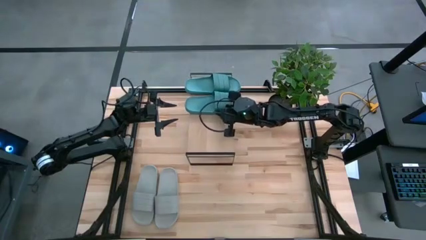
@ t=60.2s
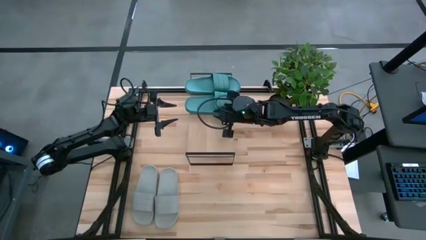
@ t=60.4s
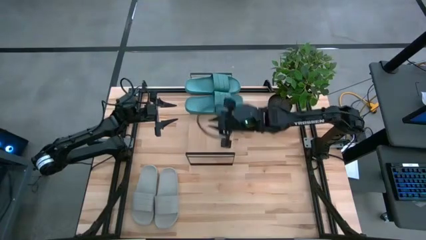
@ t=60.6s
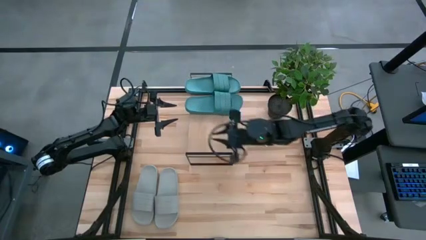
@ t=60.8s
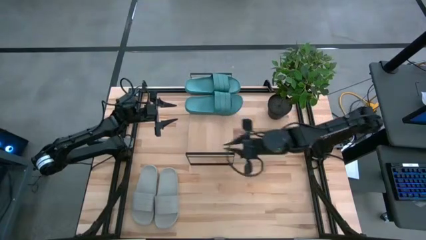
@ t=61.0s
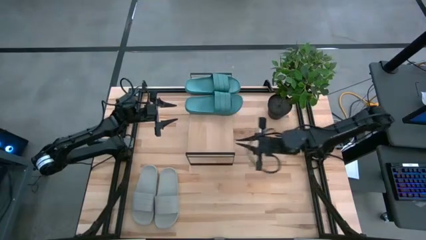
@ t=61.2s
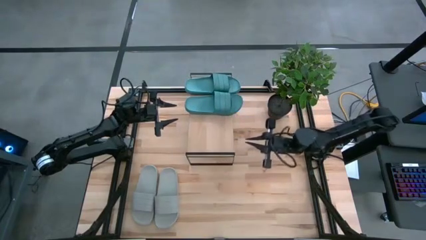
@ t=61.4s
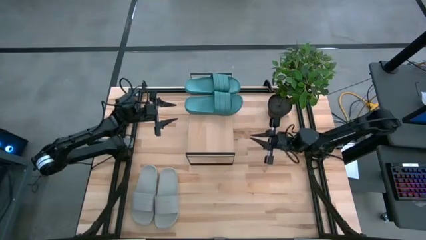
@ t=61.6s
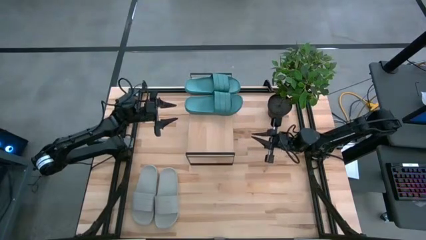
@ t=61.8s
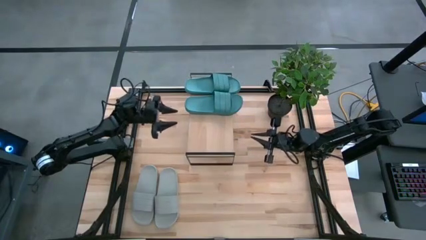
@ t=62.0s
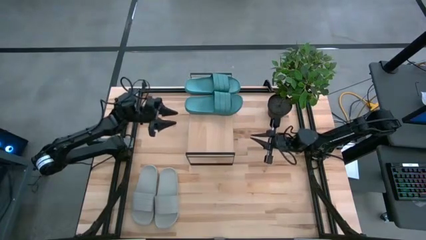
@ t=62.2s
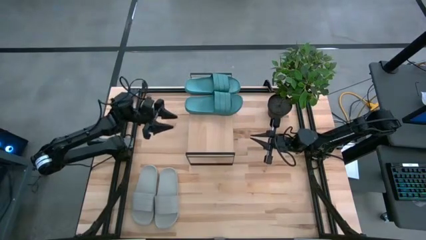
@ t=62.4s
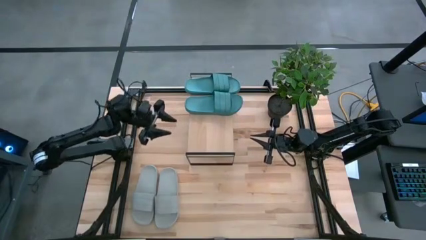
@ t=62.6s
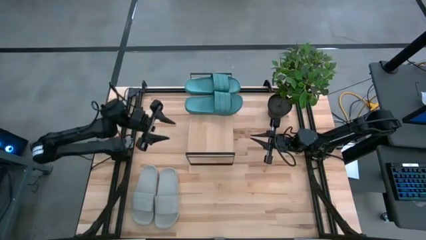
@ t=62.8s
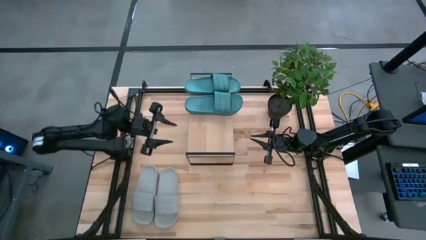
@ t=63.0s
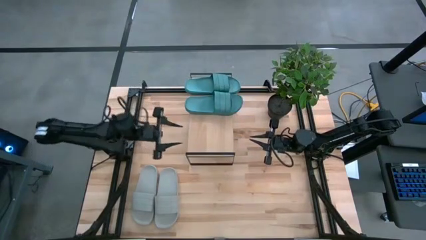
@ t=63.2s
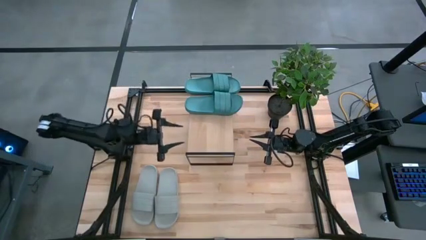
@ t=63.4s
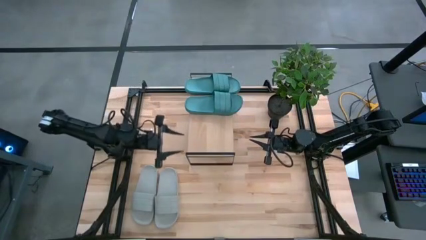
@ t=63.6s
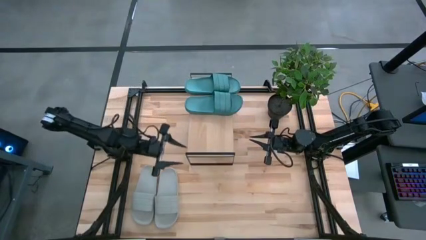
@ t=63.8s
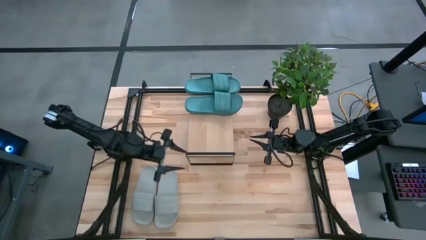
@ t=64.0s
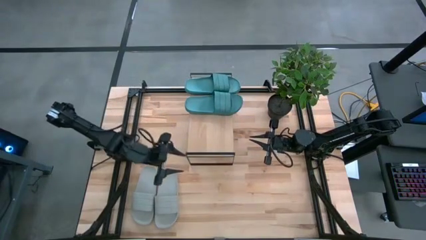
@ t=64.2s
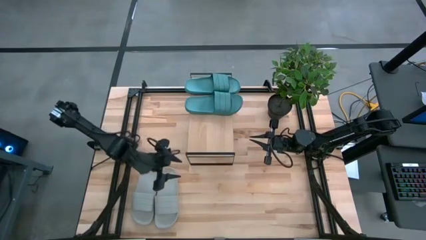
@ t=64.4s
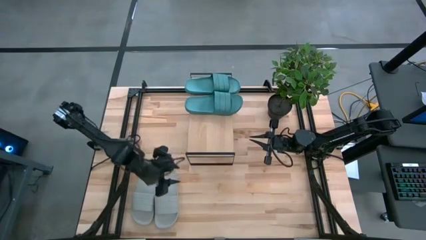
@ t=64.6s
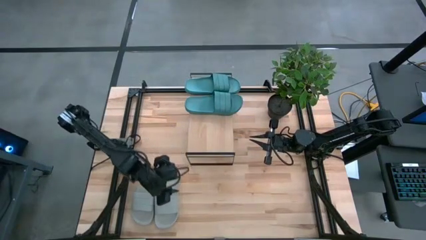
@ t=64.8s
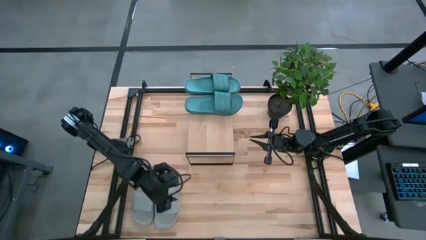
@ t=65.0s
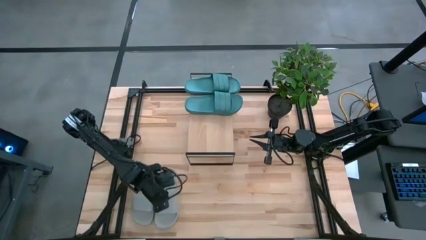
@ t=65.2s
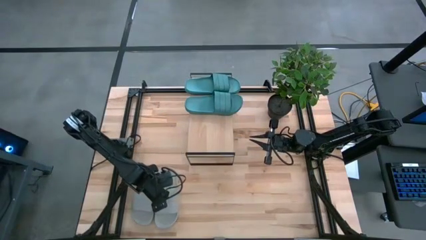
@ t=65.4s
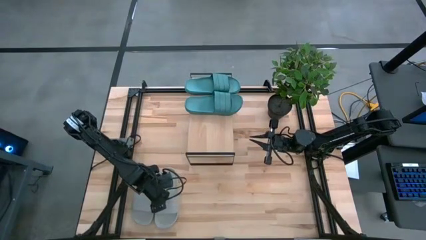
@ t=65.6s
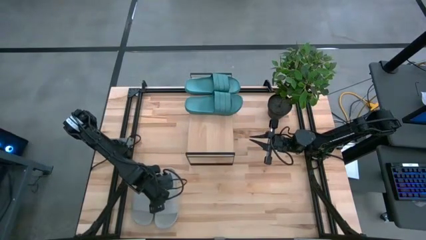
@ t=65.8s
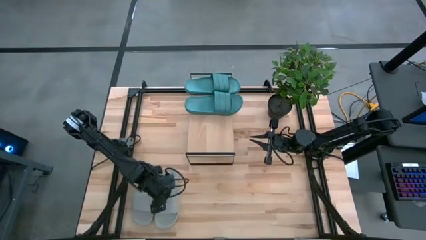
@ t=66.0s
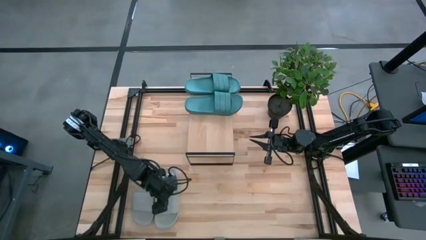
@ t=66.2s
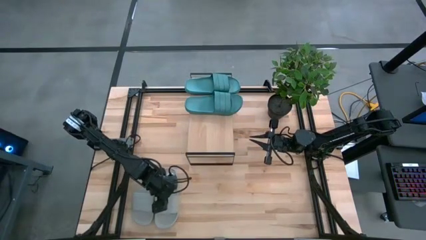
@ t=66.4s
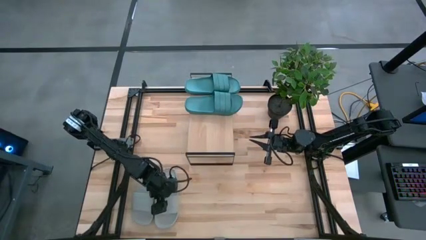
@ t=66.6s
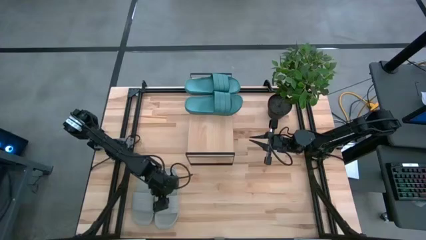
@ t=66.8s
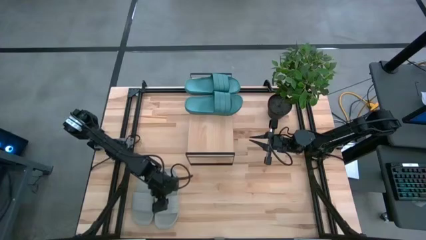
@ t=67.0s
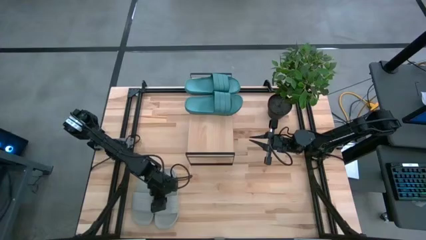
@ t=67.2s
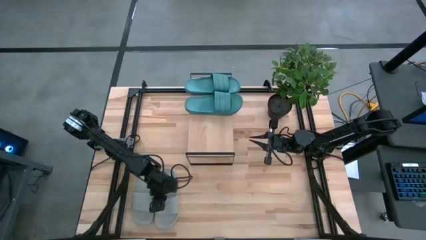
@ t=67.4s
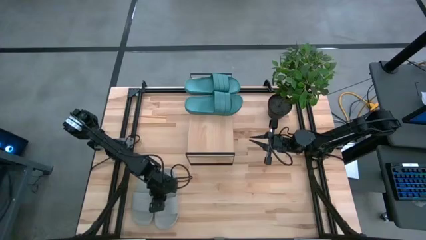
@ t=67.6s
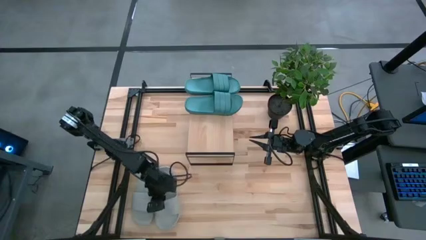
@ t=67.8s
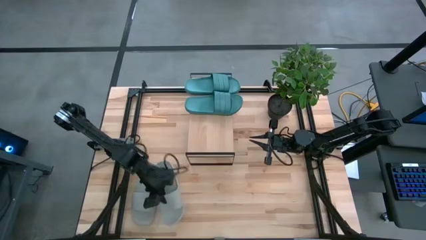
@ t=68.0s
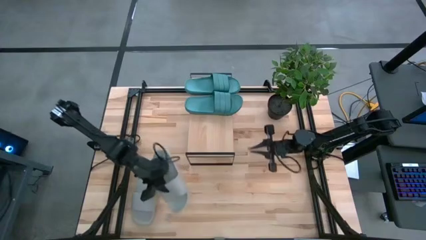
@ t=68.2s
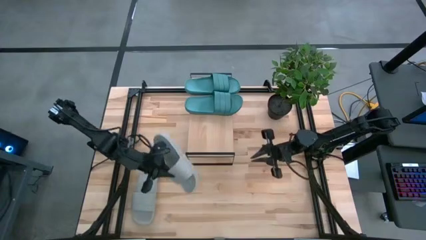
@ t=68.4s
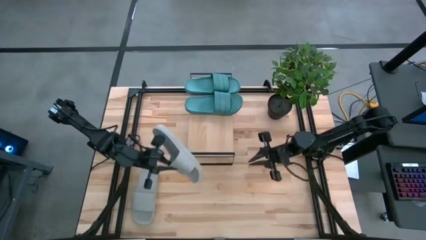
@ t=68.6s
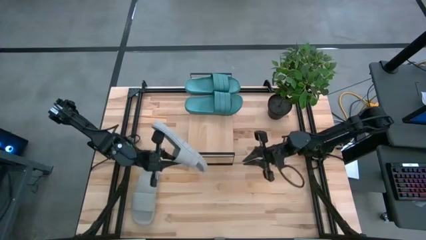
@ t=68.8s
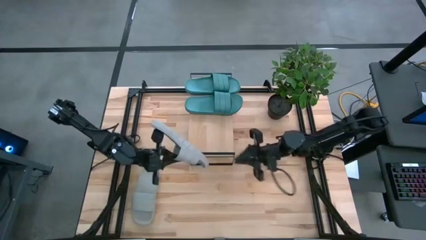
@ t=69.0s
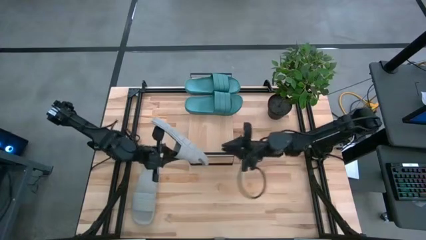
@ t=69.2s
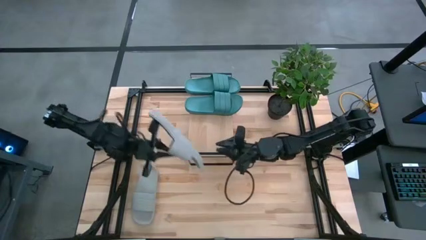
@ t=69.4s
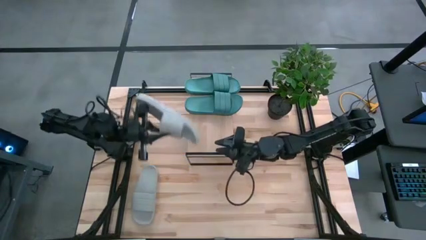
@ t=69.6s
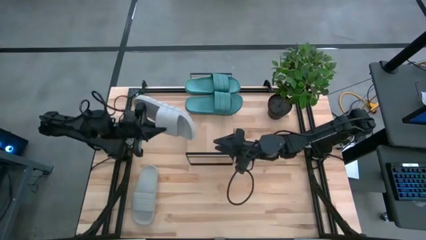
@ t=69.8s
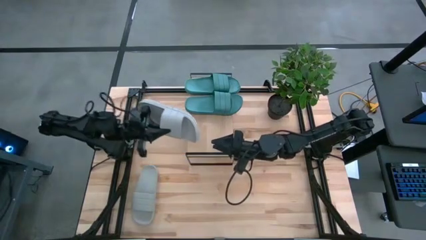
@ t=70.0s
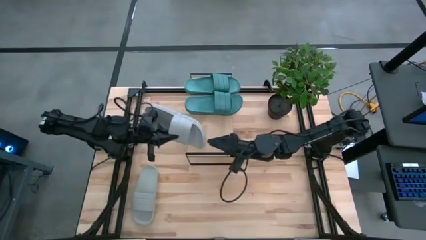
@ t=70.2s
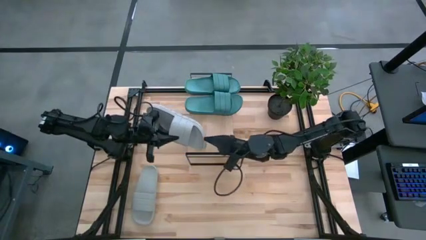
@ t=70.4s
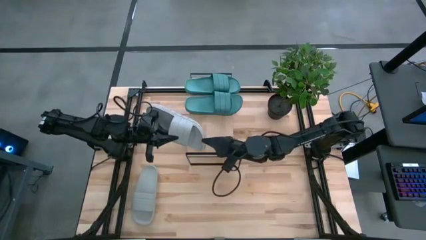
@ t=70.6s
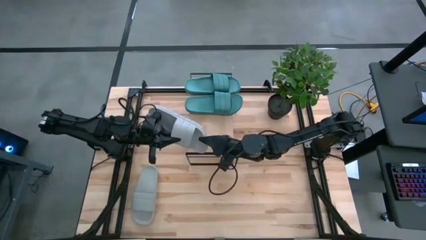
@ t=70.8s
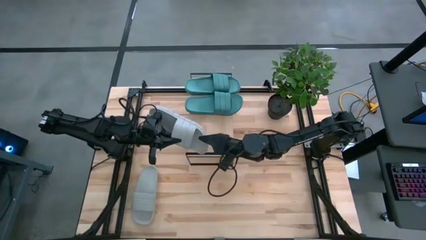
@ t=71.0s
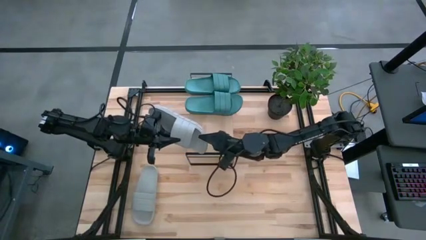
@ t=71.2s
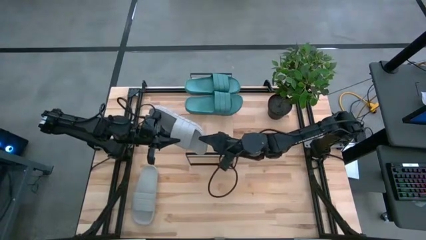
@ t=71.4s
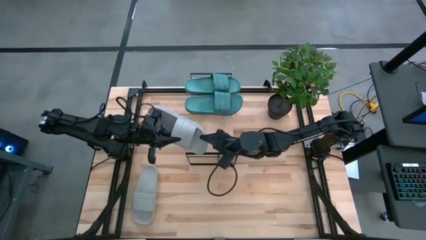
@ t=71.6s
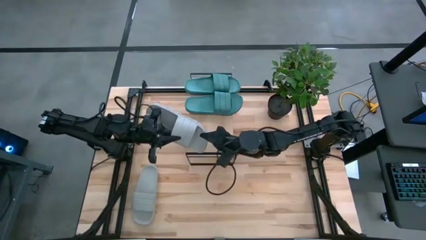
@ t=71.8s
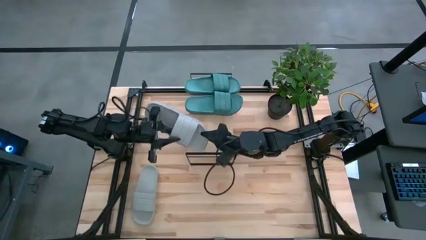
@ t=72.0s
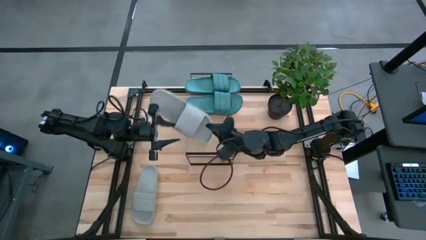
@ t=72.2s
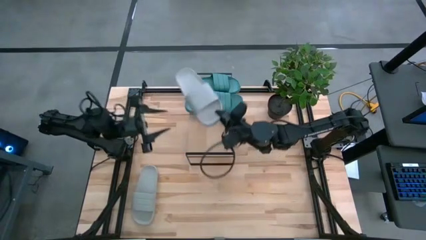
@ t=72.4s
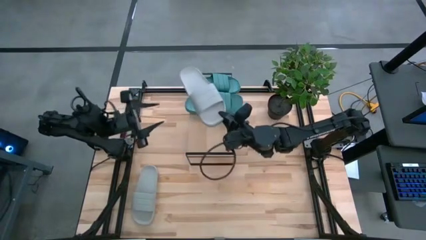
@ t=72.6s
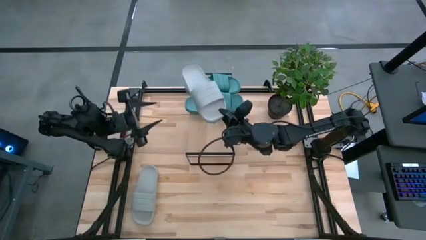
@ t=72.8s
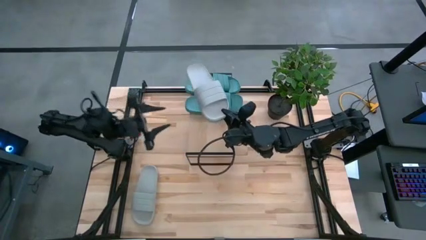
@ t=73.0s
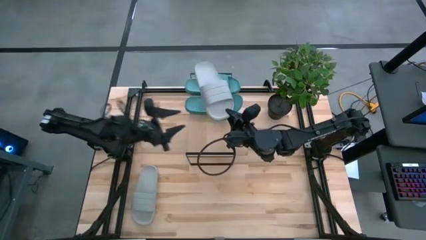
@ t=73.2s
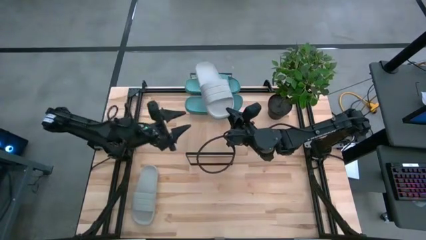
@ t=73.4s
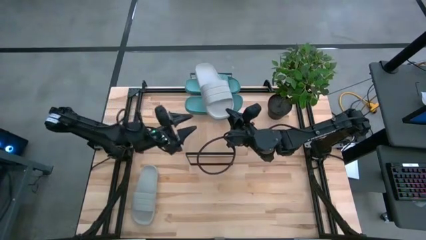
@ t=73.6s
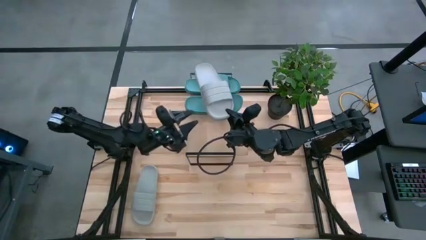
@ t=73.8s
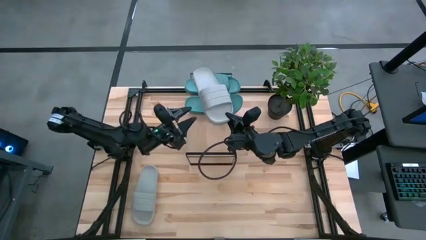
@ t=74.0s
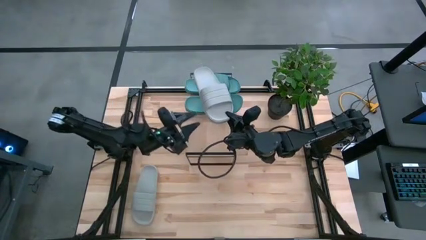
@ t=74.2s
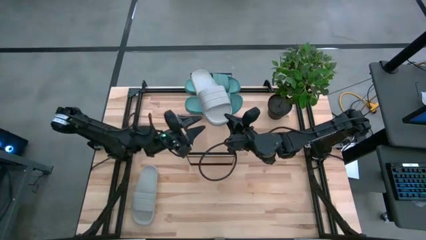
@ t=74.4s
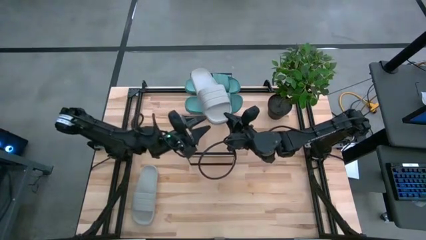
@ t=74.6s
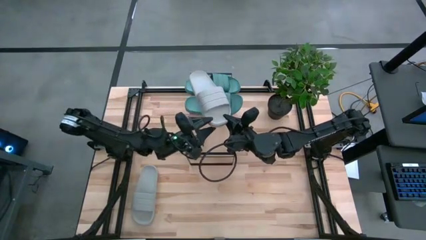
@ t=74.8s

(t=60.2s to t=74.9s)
Task: Pick and place slides into the shelf
Put the right gray slide on the shelf
